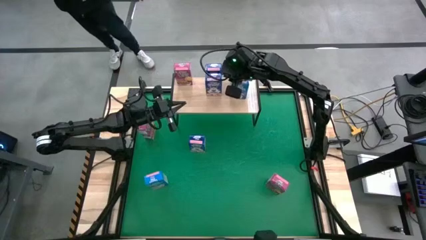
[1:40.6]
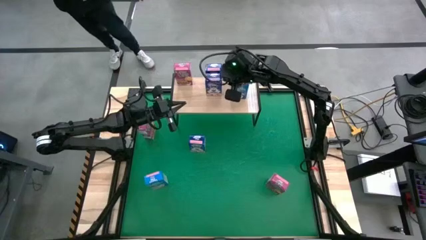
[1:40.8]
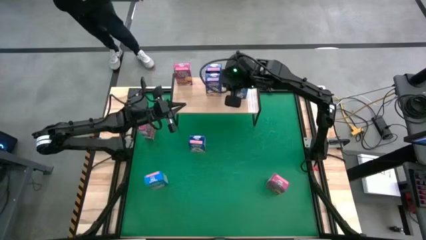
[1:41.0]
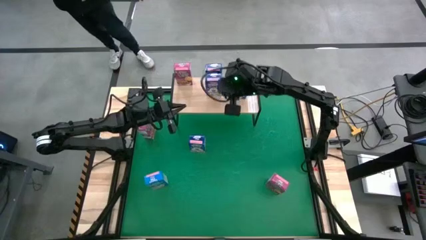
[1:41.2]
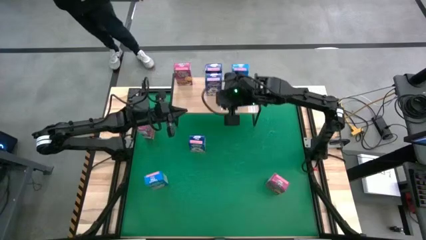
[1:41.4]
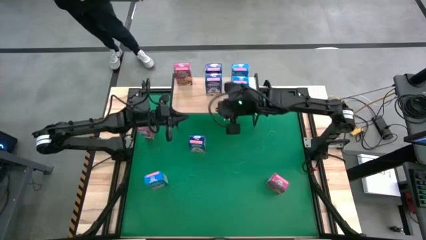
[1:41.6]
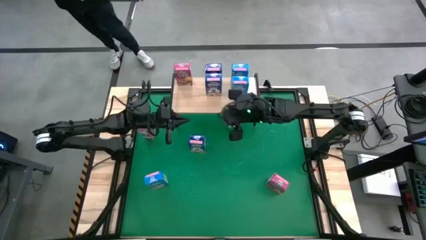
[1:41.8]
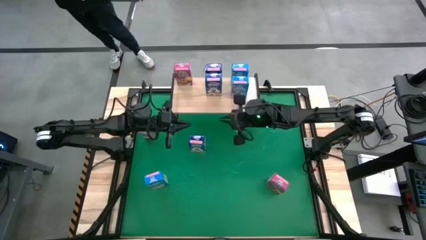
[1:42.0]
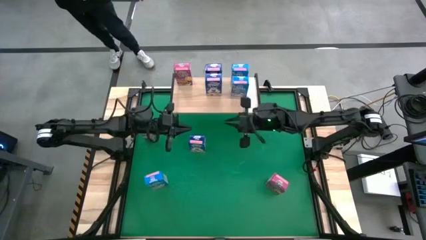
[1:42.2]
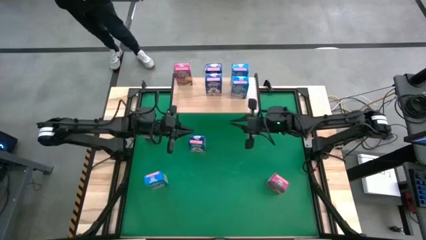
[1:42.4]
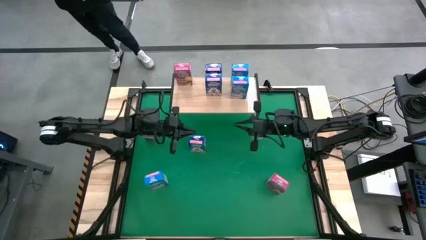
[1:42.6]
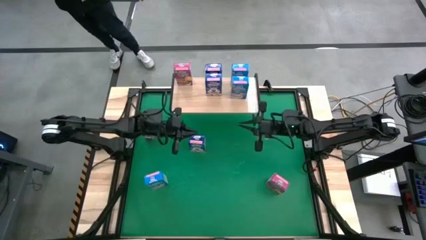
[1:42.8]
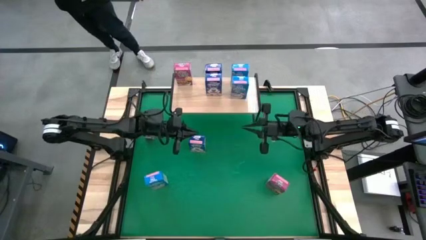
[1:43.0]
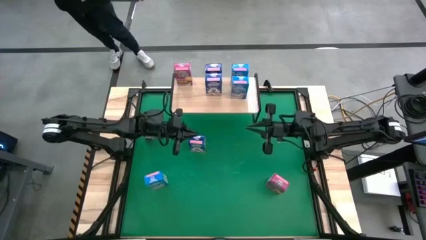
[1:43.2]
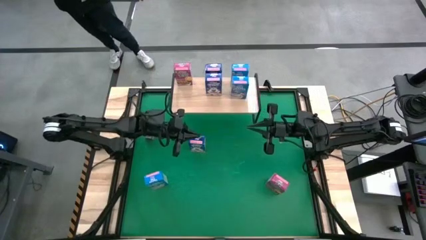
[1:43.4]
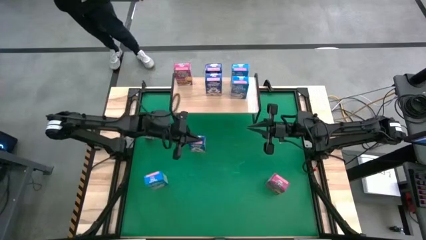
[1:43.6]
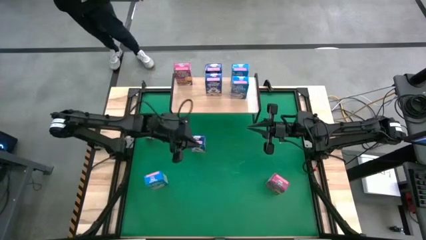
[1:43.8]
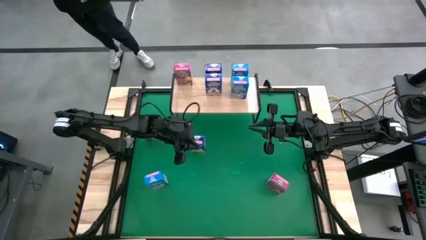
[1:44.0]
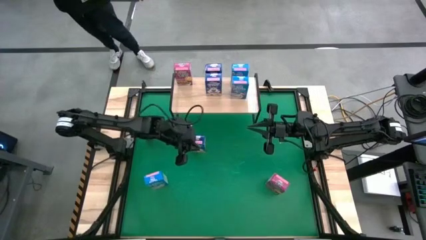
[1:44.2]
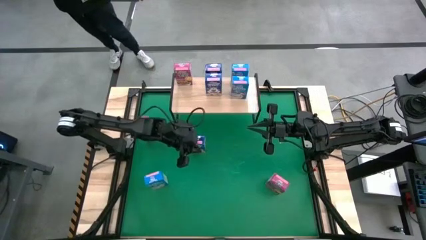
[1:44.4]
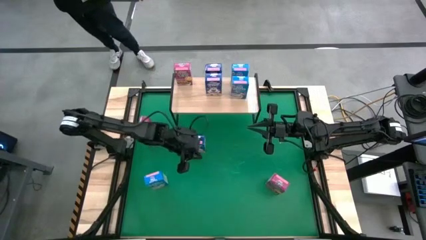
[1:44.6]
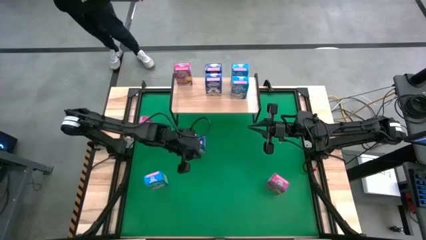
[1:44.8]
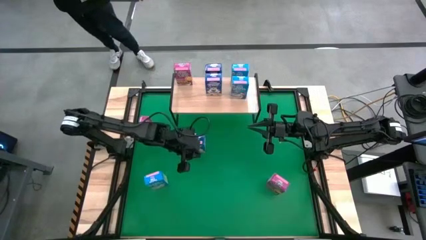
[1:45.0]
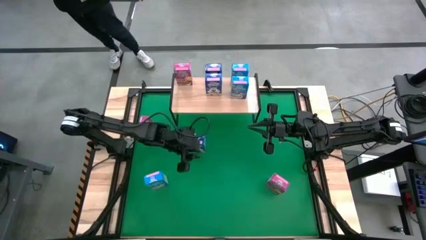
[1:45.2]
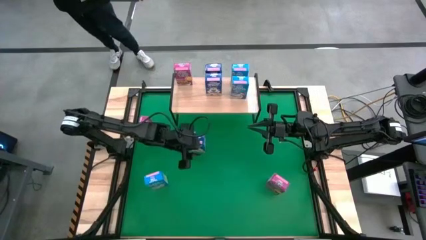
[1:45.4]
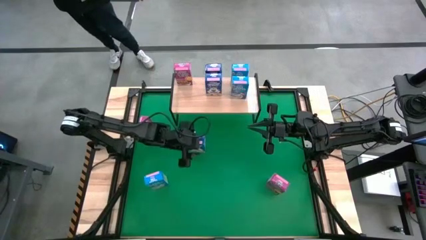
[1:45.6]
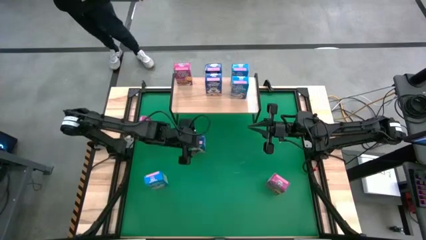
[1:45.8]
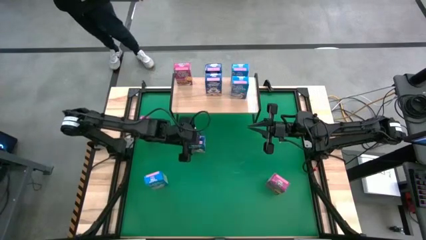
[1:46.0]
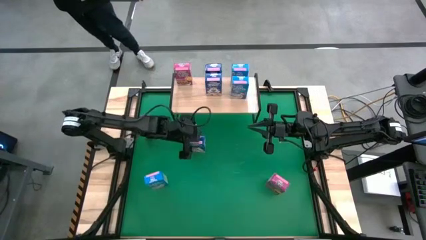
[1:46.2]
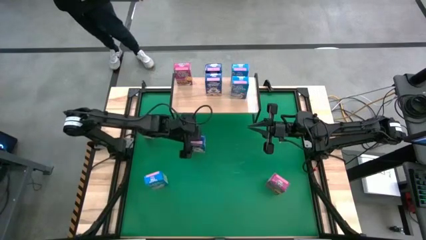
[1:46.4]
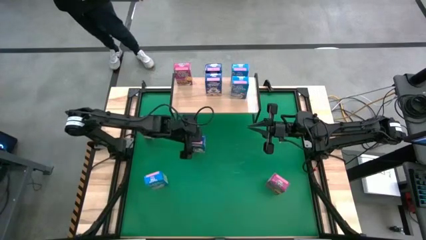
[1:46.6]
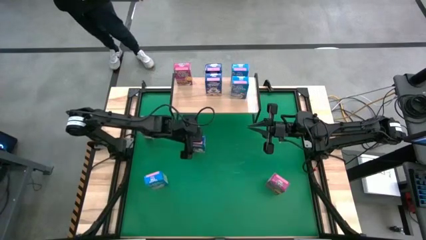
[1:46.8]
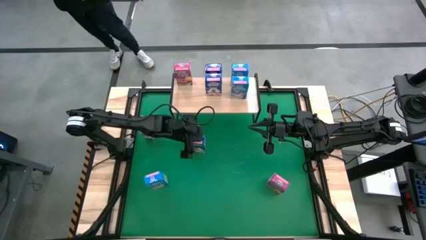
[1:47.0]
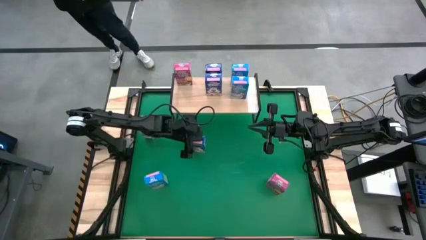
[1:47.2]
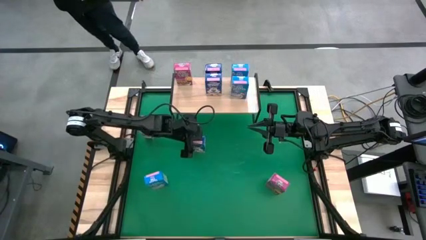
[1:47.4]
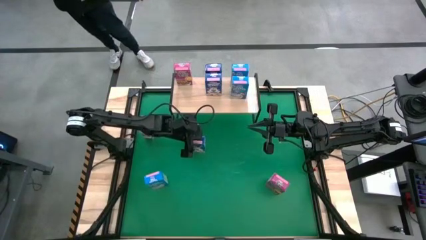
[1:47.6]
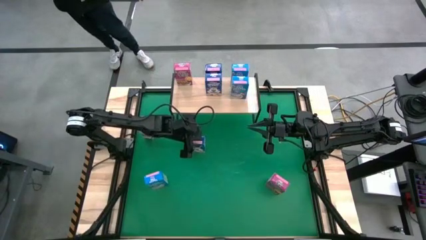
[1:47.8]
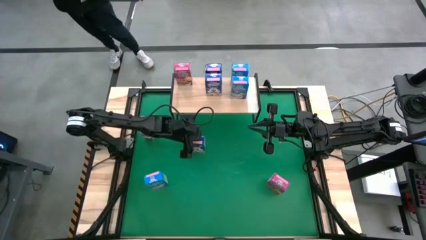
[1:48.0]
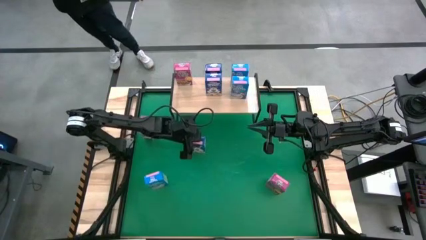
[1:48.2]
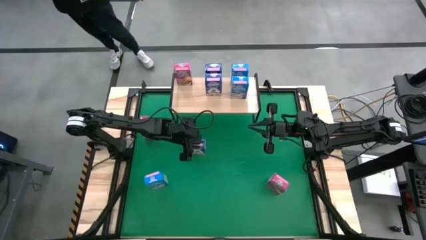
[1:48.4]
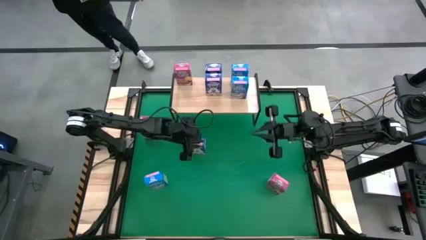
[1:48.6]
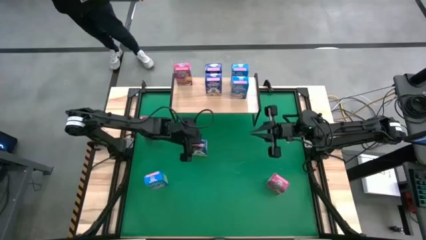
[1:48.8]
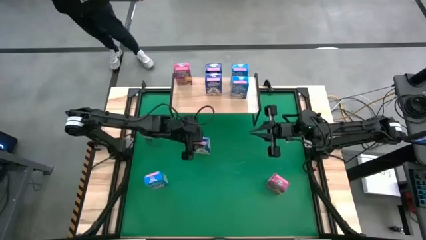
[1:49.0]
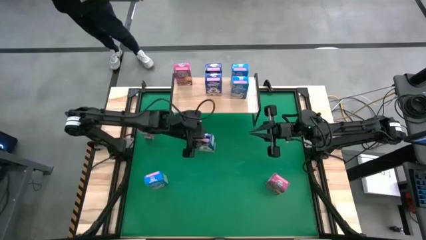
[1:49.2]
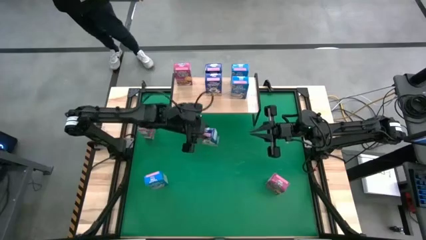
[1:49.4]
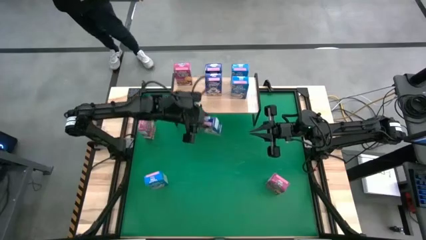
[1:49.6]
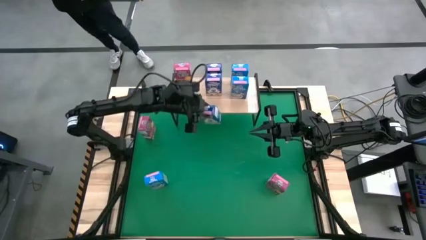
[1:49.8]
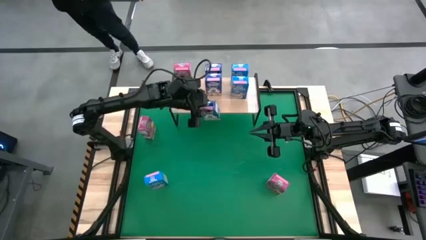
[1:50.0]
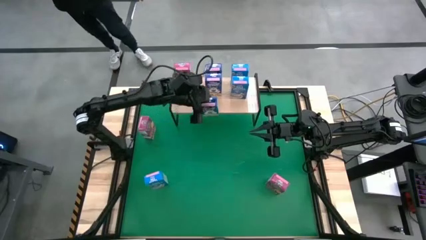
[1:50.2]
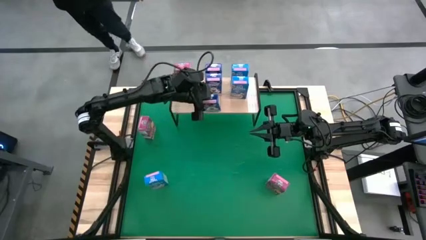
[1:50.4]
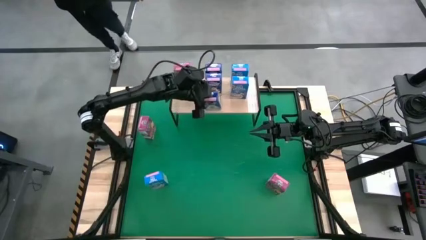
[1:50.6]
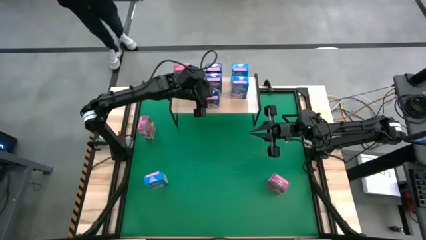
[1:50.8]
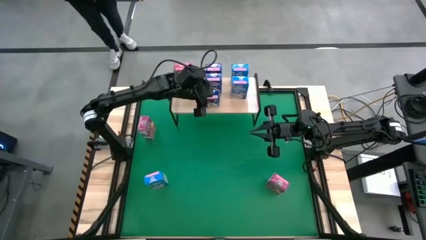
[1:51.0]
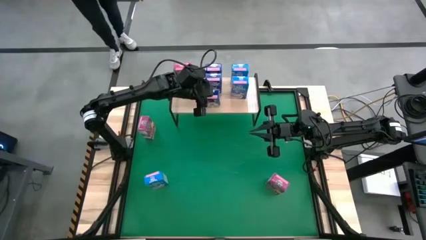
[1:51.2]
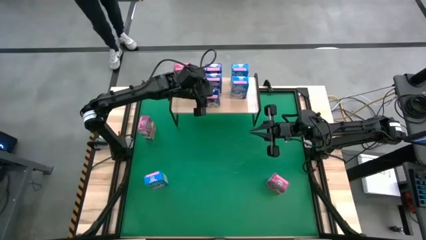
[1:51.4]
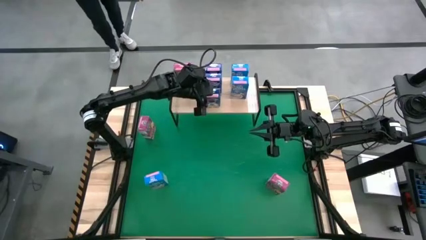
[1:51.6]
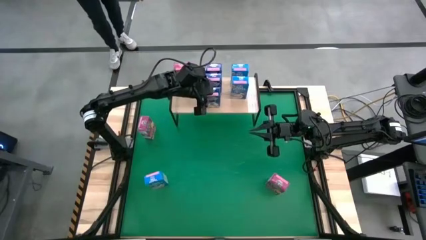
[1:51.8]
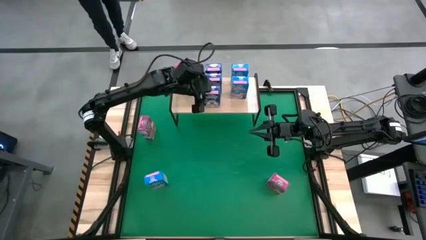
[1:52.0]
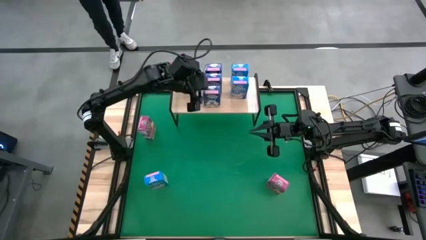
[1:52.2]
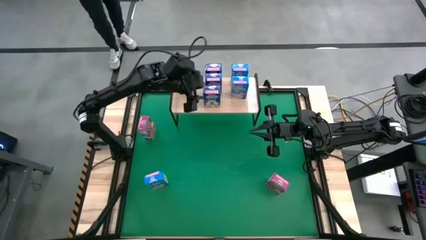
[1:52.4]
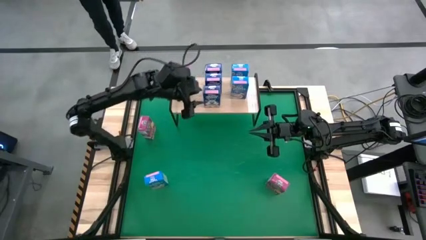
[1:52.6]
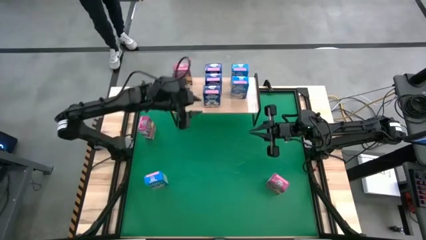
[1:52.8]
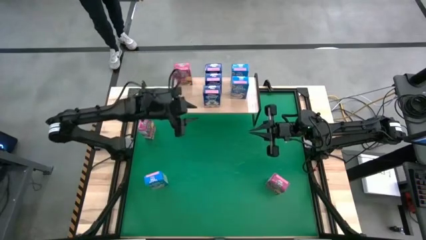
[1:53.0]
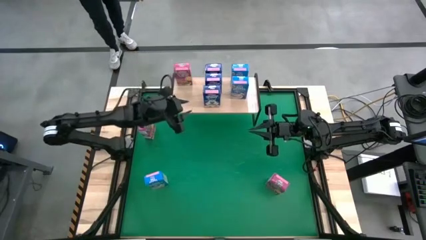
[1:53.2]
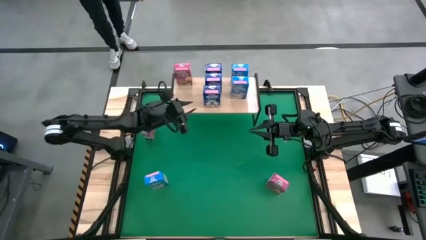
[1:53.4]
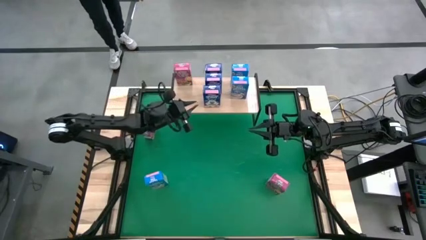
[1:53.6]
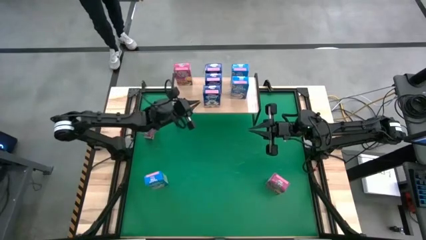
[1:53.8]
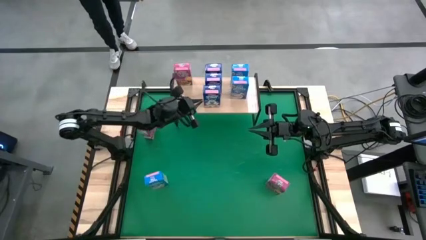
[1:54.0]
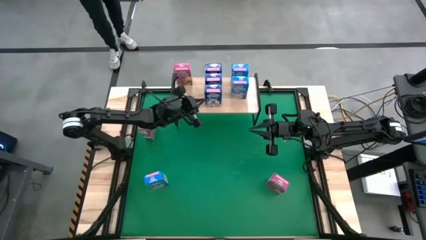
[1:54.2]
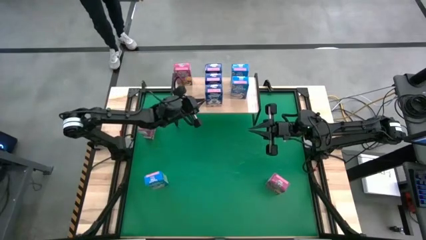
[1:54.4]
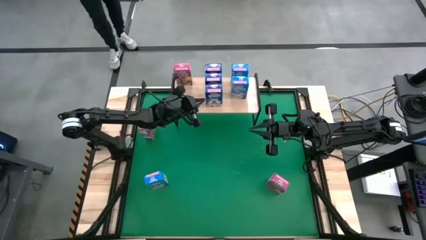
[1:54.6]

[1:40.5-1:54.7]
Task: Stack cereal on shelf
Put the blue cereal box on the shelf aligned with the other blue cereal boxes

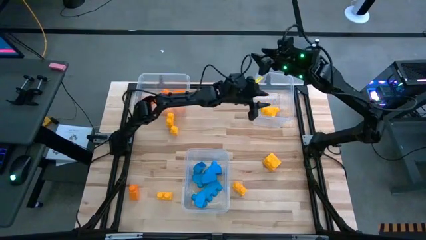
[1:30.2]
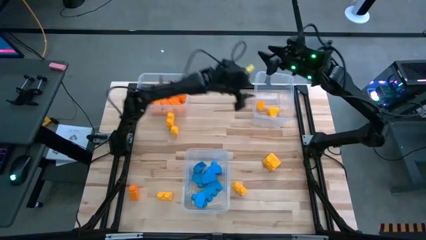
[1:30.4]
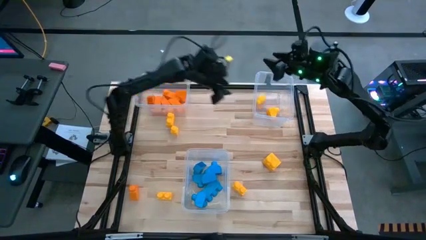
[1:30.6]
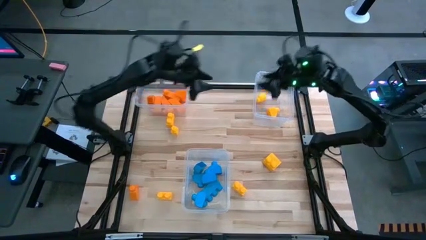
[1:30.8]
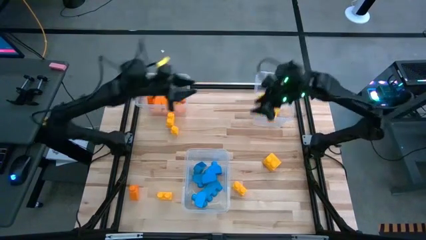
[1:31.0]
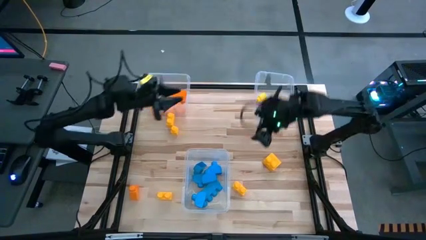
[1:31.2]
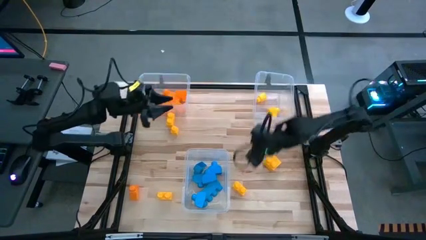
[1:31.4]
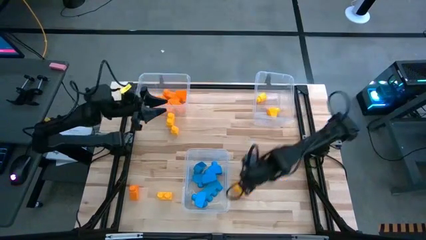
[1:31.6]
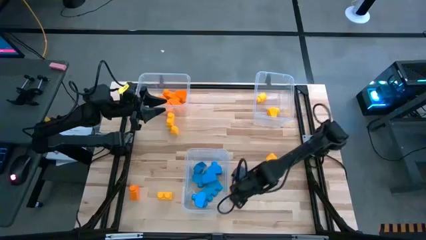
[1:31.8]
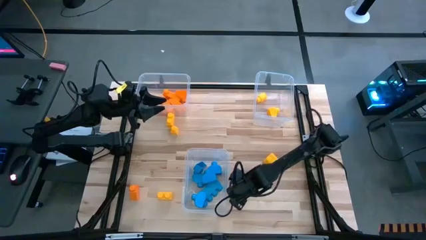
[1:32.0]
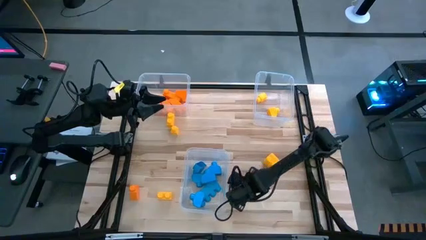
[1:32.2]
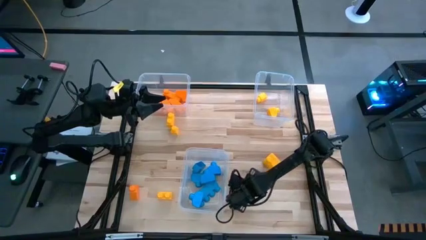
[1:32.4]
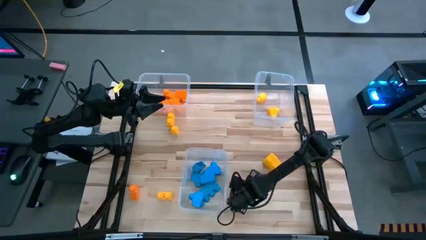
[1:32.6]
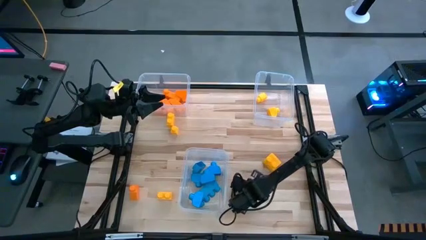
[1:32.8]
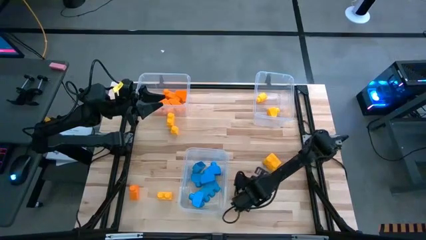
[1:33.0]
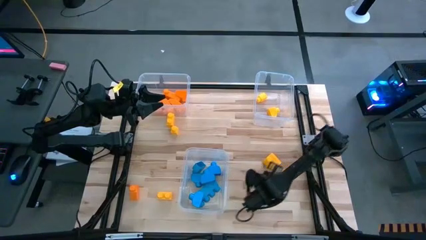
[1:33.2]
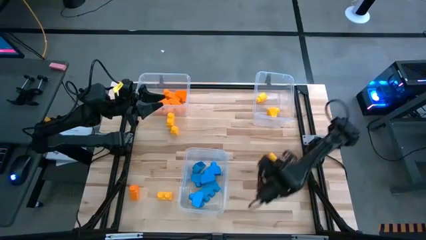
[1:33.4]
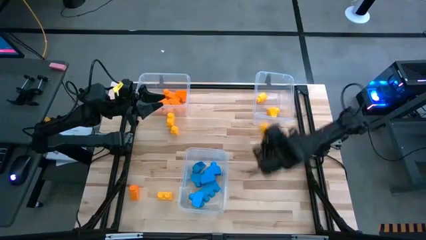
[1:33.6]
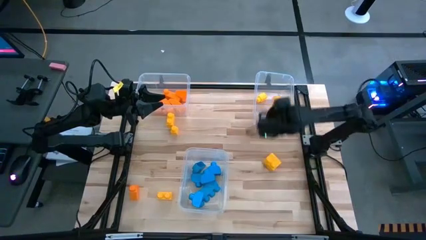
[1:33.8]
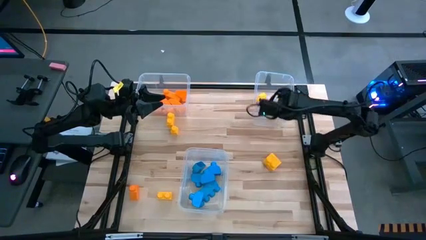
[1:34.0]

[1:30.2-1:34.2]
Task: Sort blocks
Put the yellow game piece into the top right transparent bin
